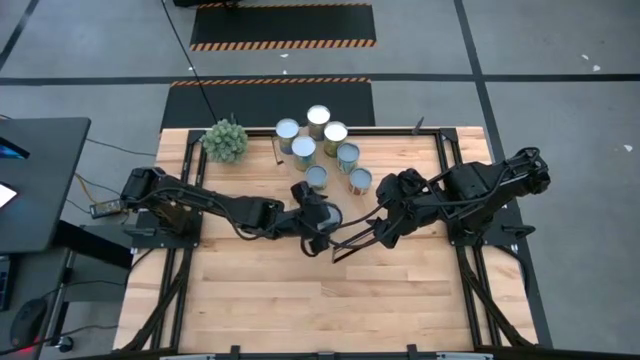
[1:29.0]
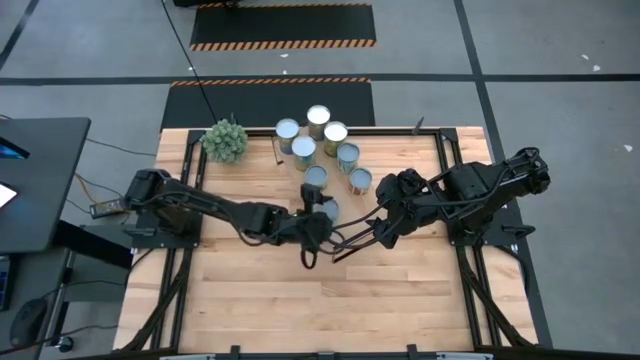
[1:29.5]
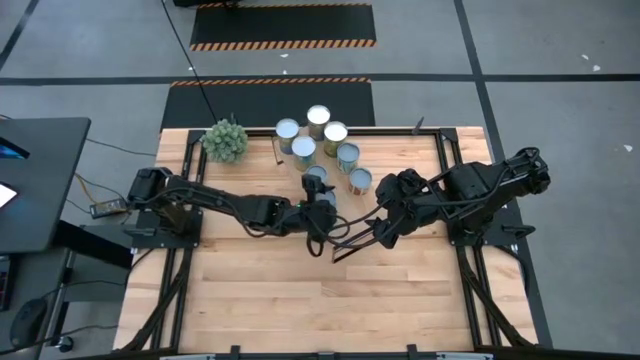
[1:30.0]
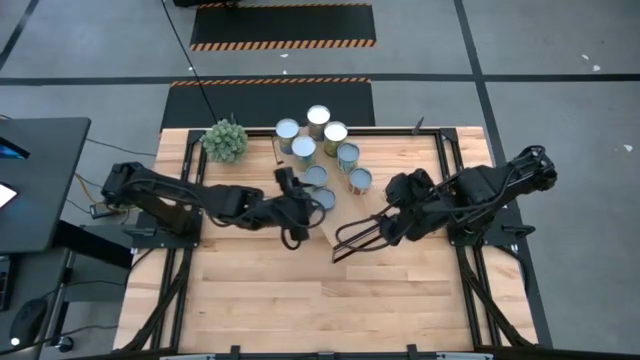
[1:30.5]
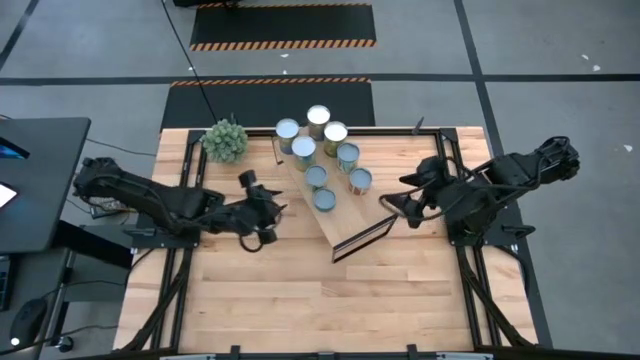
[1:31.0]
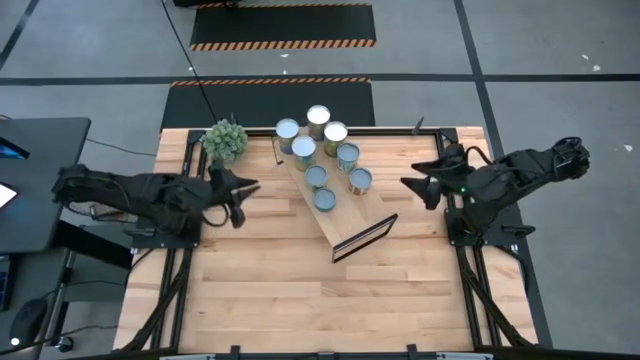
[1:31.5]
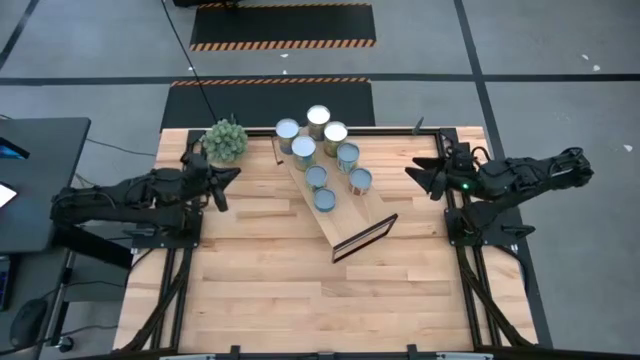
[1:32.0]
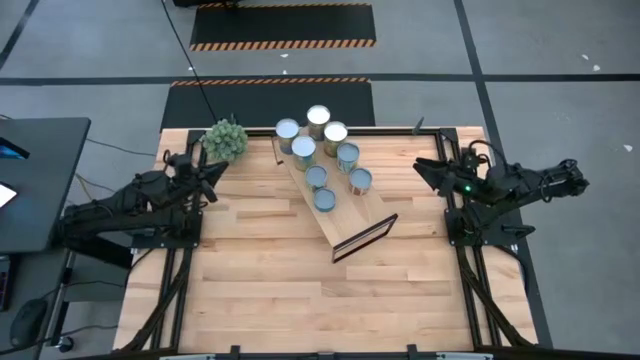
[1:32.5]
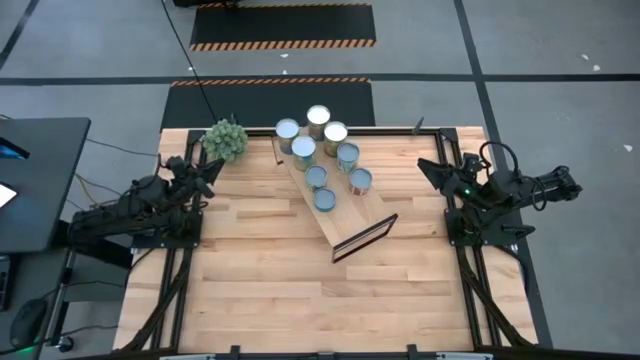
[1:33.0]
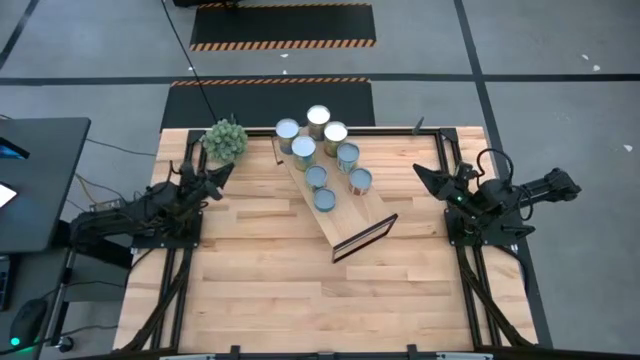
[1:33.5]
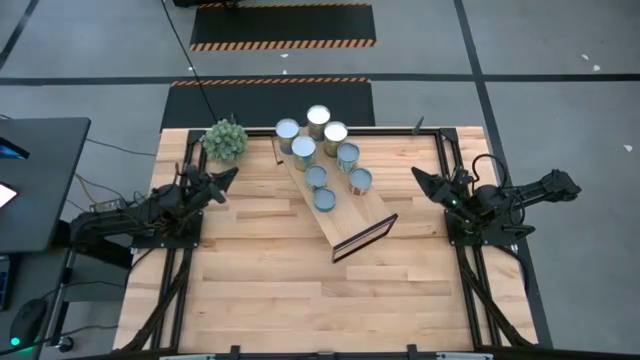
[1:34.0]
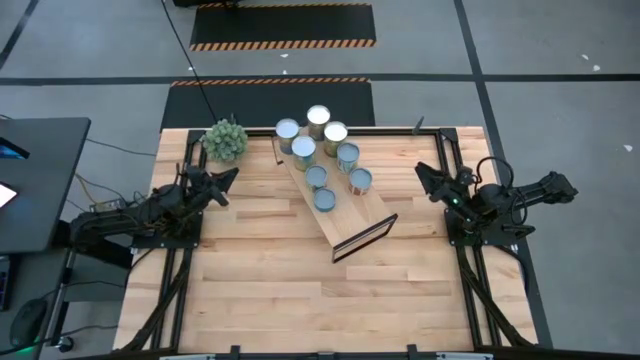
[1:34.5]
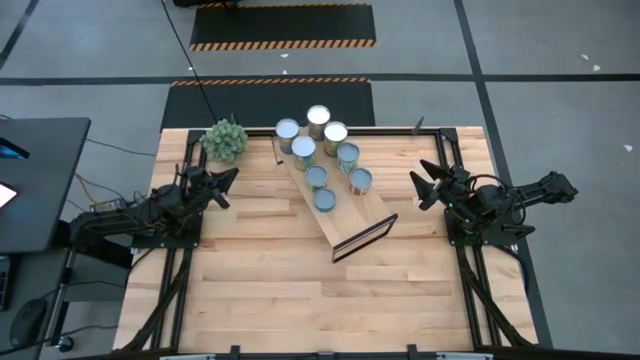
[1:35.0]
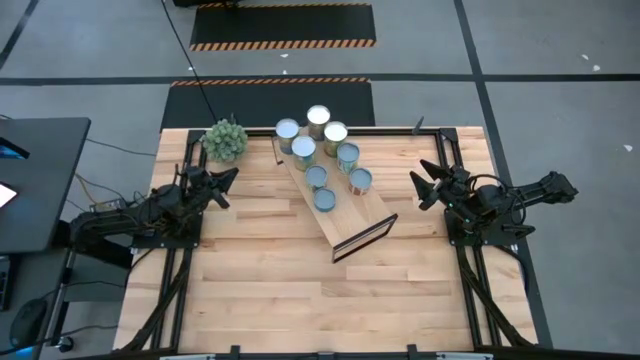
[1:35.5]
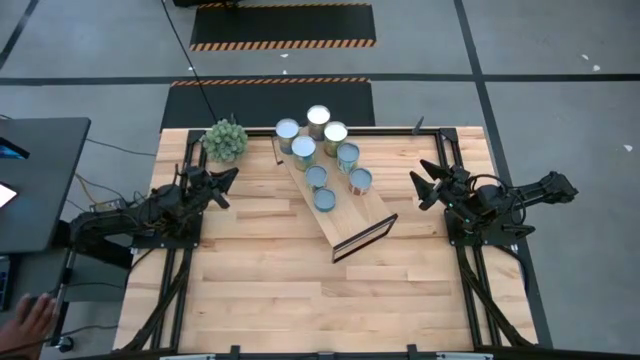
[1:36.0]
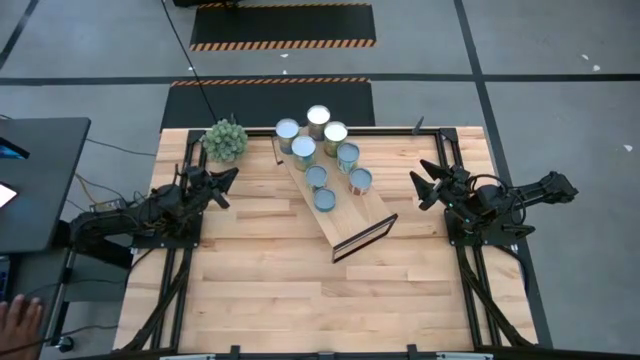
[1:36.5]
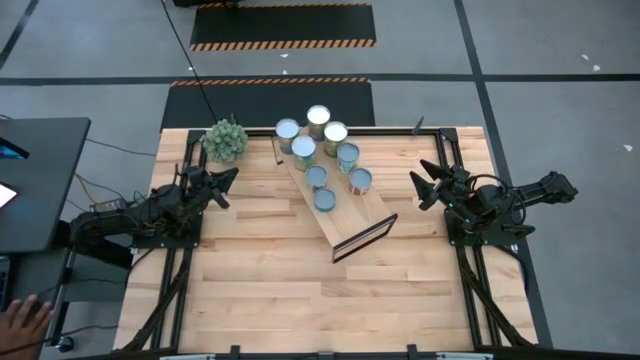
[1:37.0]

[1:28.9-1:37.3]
Task: Pick and place cans onto a shelf
Return to Home Position

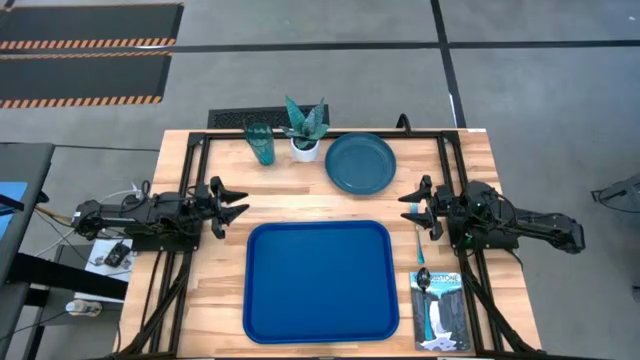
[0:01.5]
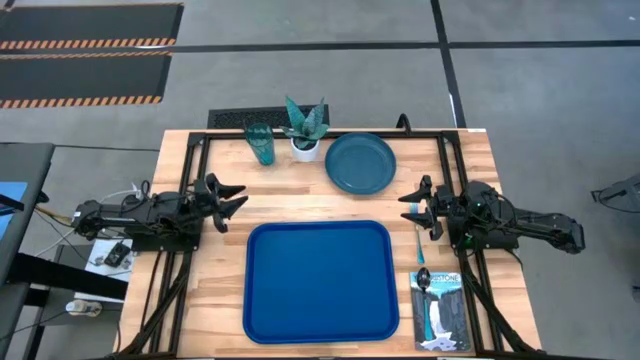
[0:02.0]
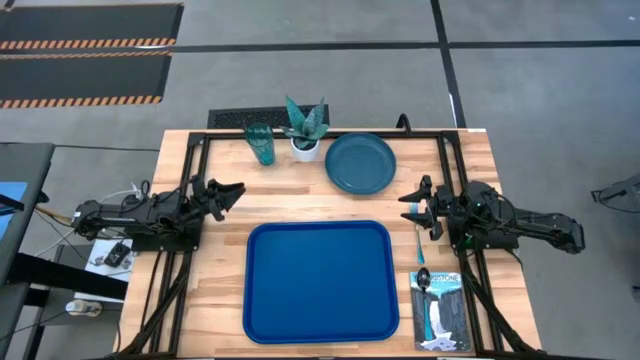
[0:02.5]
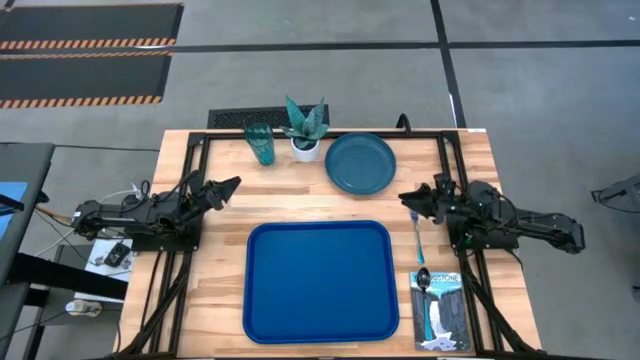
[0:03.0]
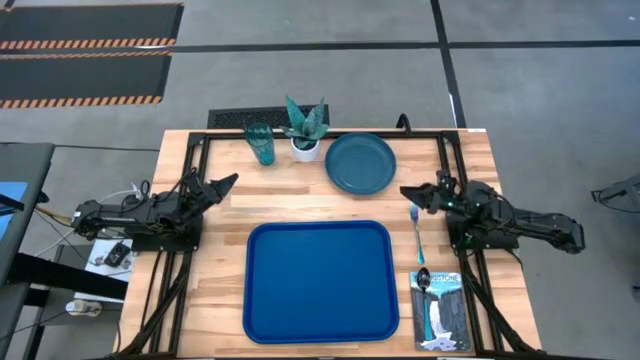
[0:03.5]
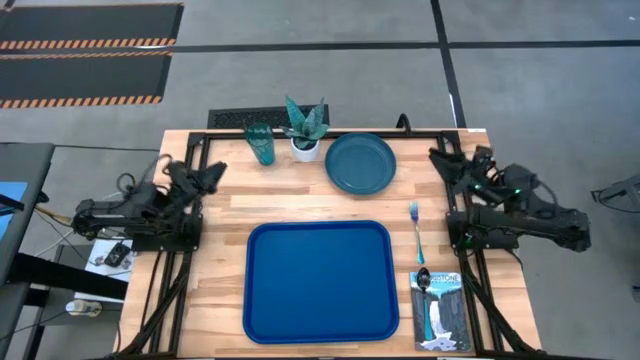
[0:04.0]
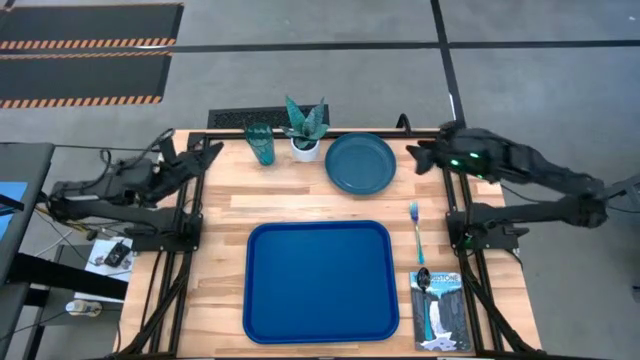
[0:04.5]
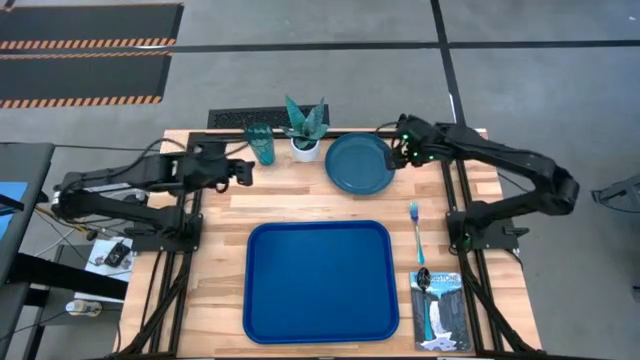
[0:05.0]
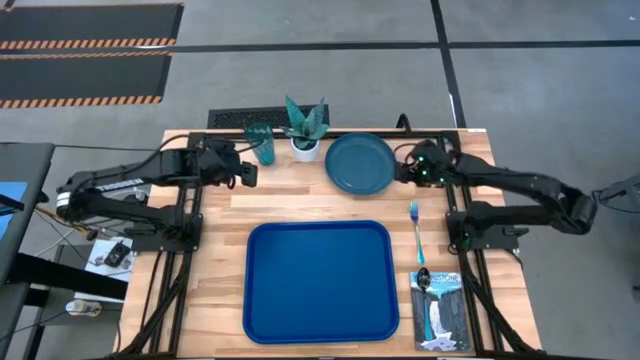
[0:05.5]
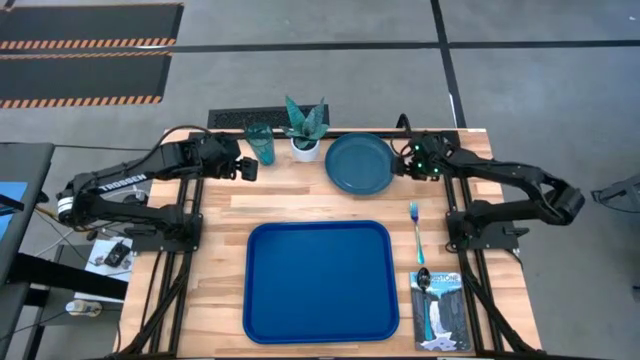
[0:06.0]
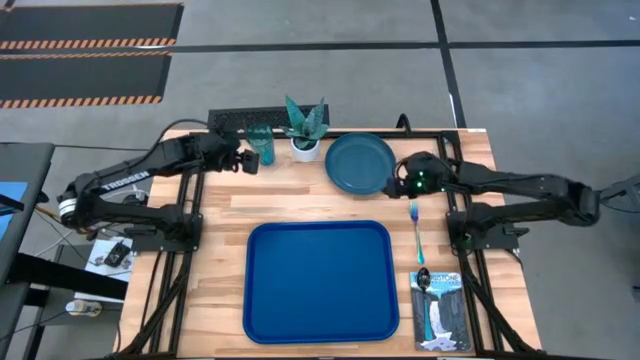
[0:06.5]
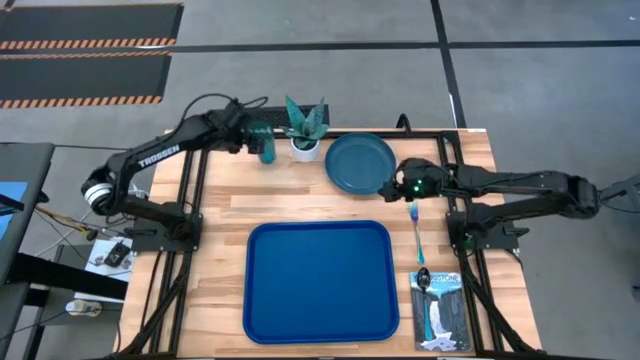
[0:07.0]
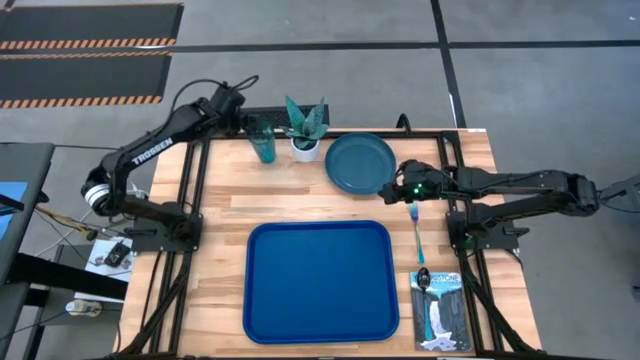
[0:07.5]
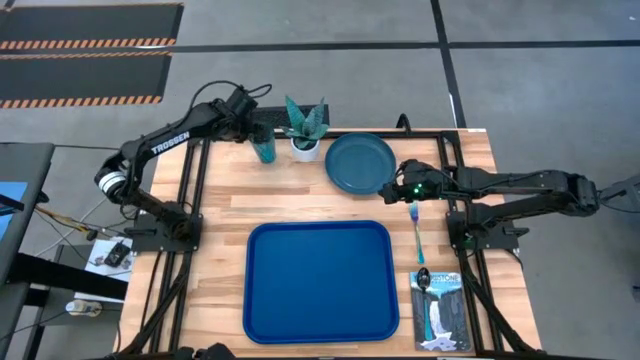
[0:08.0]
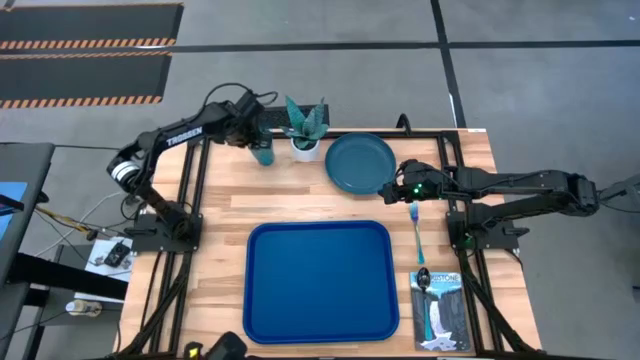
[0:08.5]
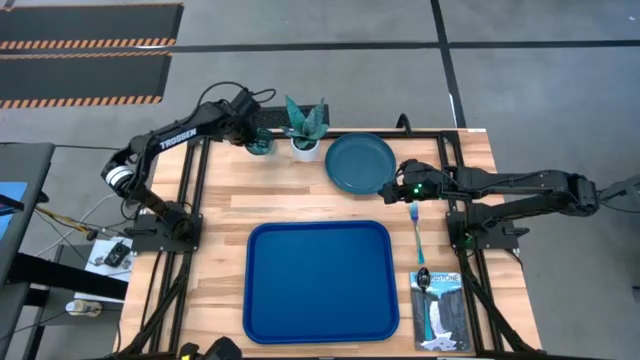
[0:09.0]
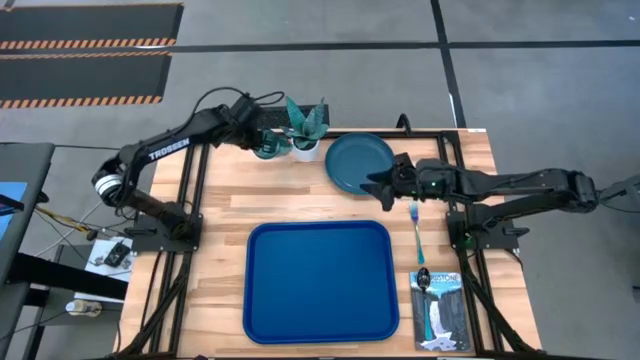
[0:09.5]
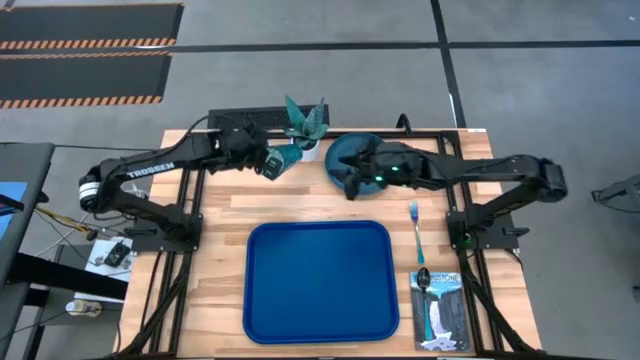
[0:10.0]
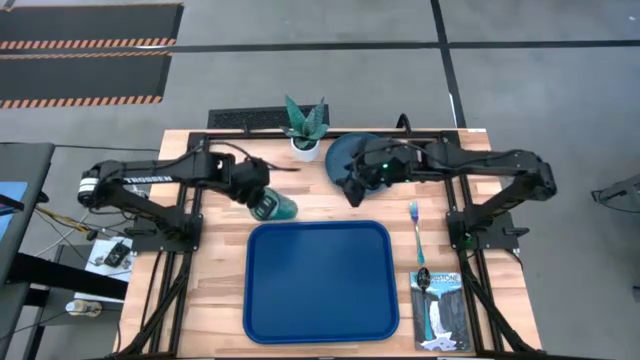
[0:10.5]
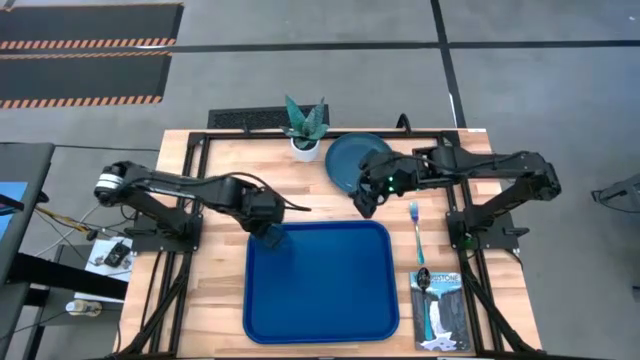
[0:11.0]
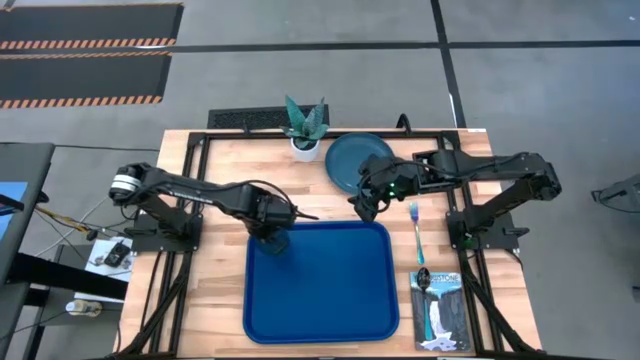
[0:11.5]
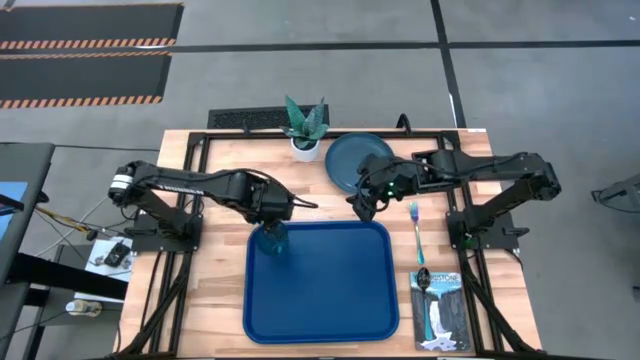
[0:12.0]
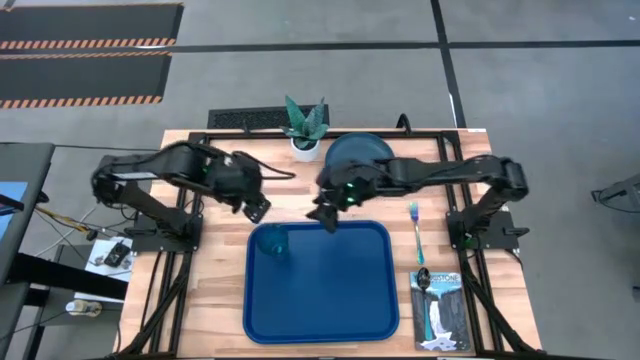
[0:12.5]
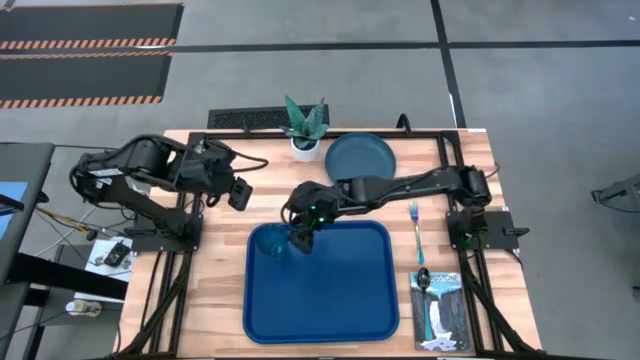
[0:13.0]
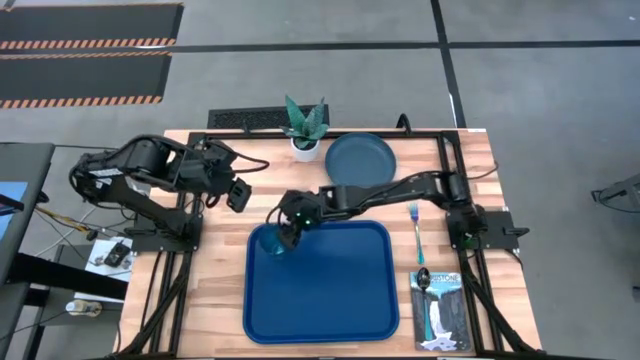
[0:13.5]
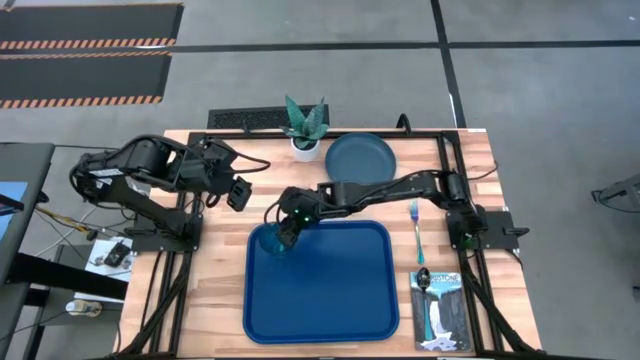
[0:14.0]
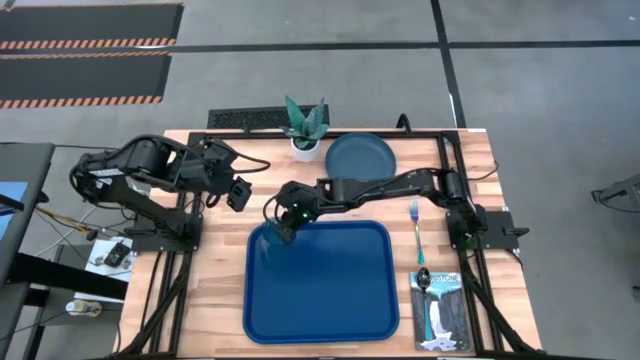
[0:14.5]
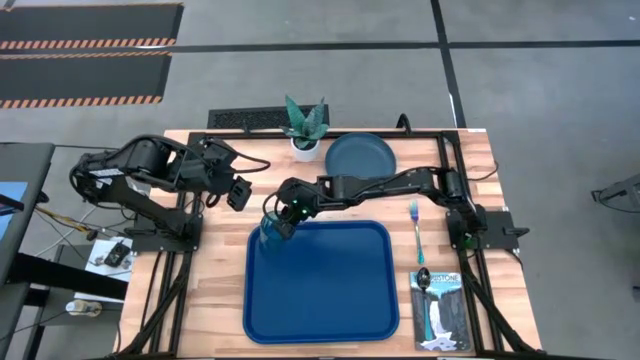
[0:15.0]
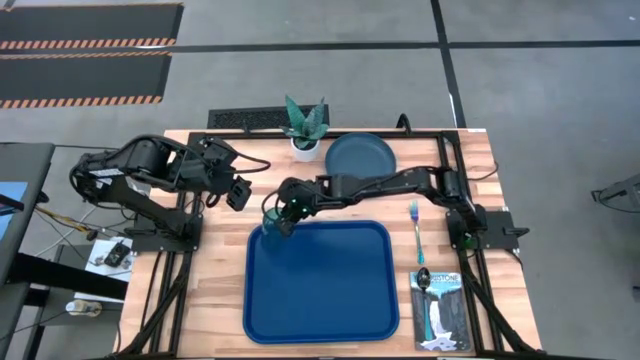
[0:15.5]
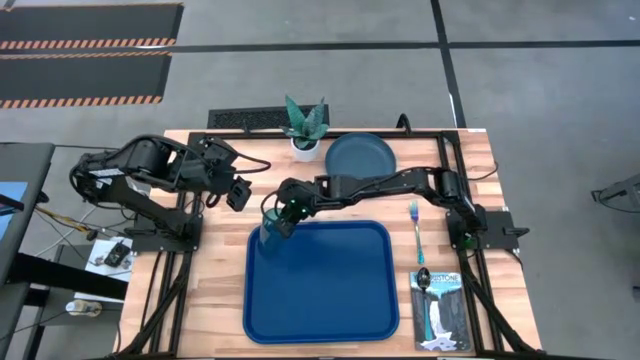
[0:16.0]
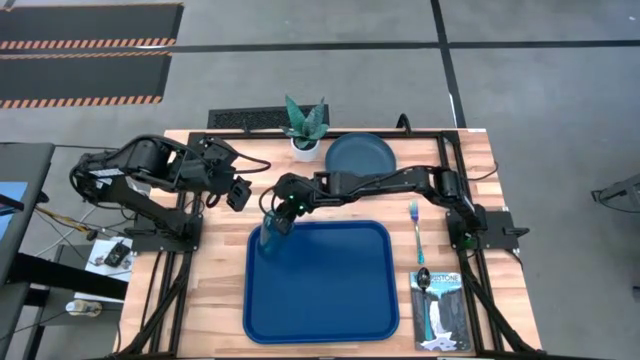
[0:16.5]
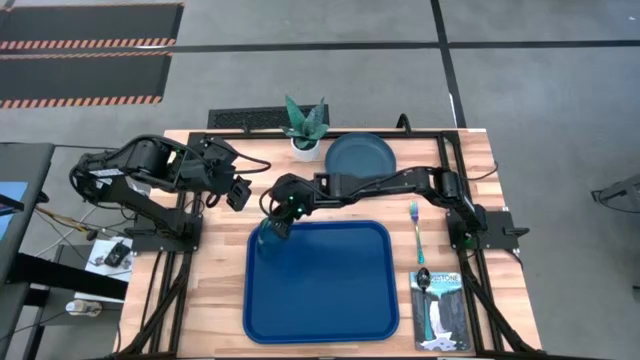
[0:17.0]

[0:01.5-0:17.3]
Task: Pick and place plate/cup/fork/spoon on tray
Put the blue cup on the top left of the blue tray
